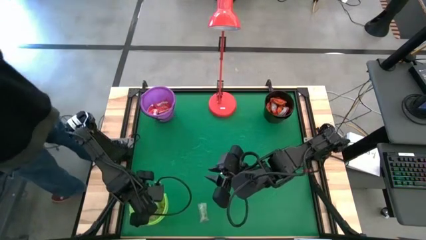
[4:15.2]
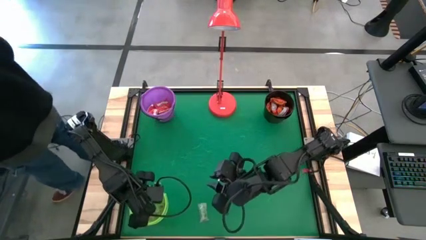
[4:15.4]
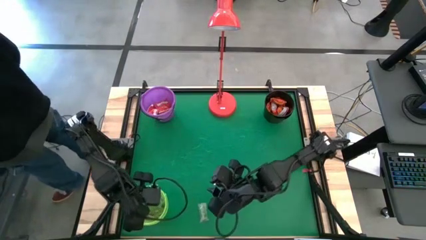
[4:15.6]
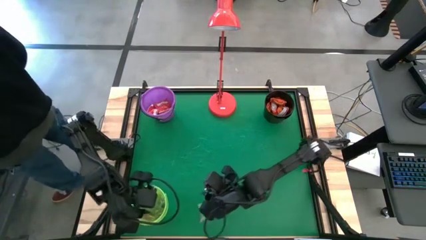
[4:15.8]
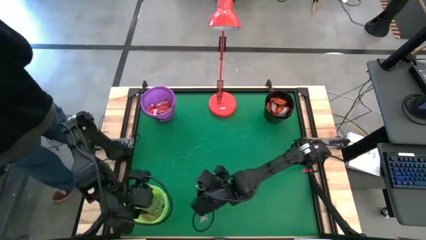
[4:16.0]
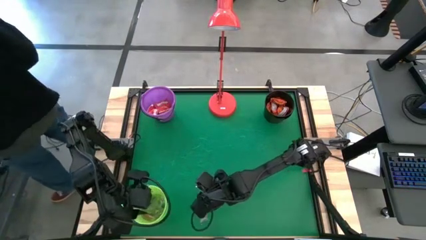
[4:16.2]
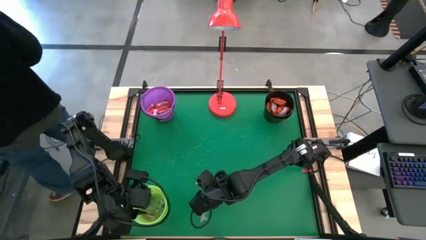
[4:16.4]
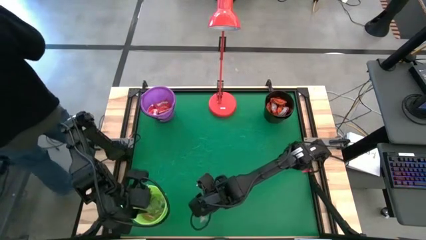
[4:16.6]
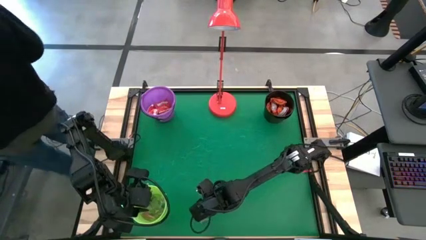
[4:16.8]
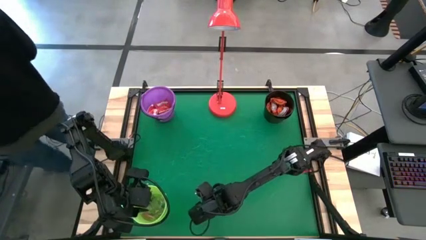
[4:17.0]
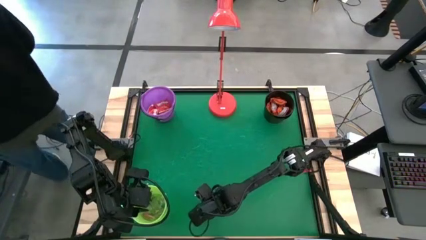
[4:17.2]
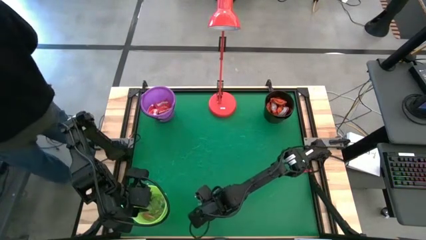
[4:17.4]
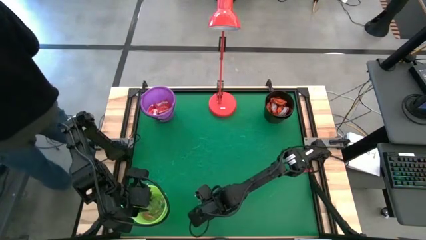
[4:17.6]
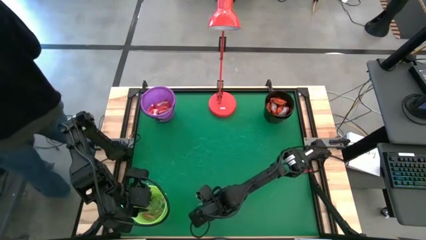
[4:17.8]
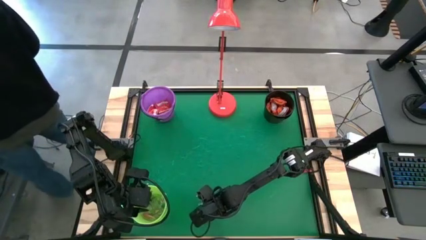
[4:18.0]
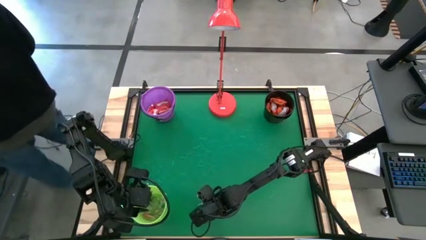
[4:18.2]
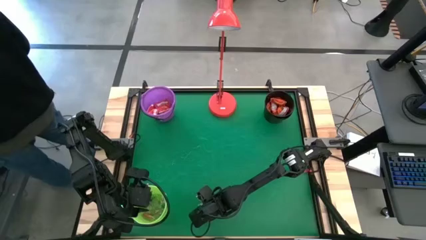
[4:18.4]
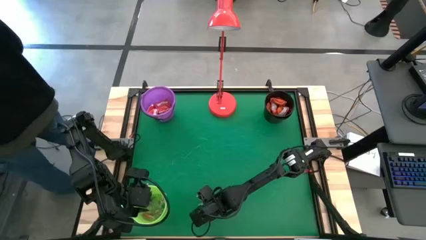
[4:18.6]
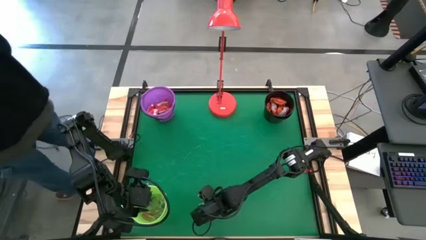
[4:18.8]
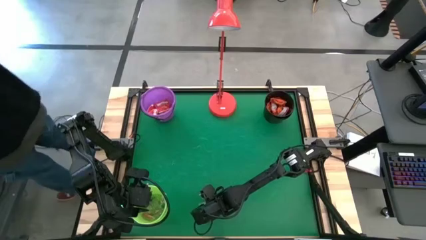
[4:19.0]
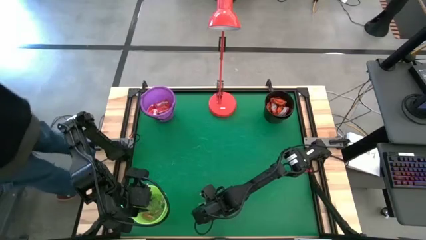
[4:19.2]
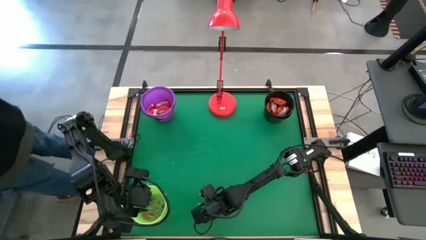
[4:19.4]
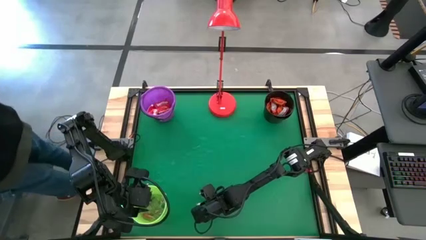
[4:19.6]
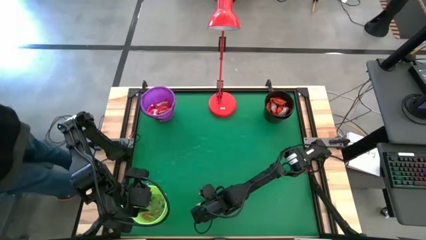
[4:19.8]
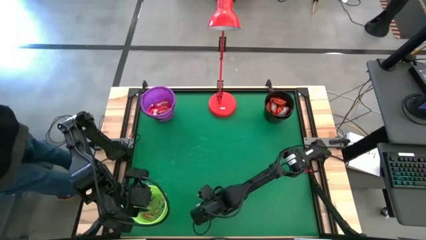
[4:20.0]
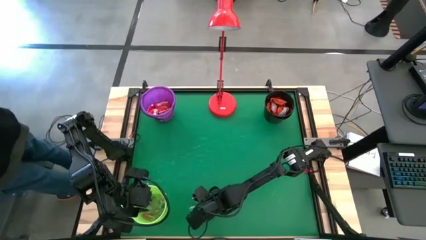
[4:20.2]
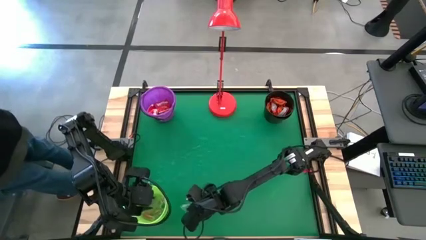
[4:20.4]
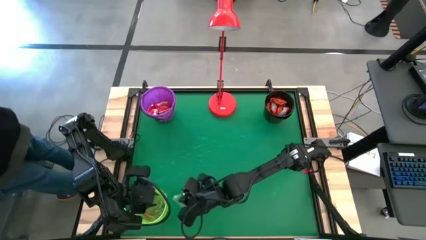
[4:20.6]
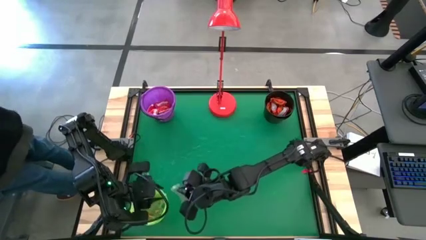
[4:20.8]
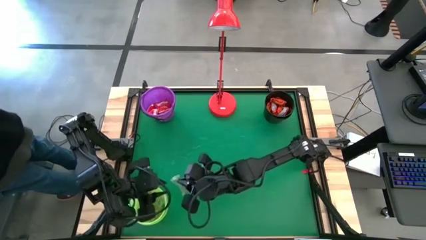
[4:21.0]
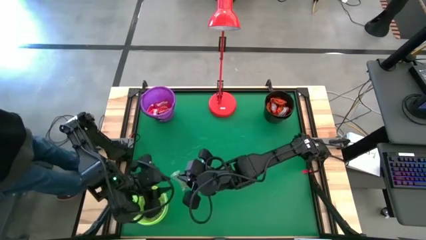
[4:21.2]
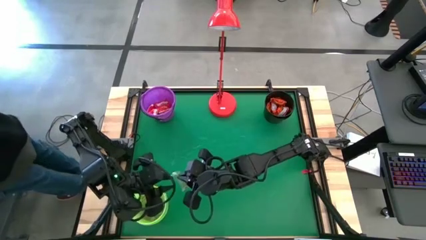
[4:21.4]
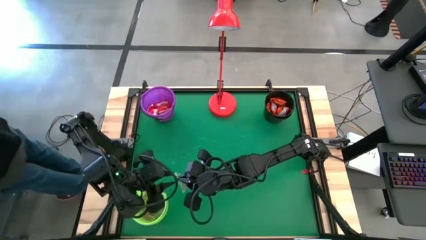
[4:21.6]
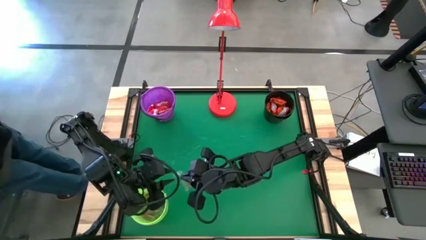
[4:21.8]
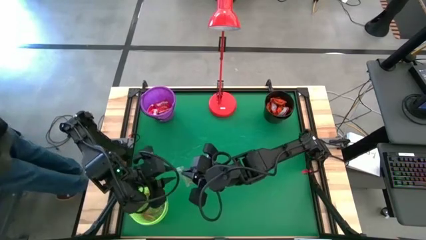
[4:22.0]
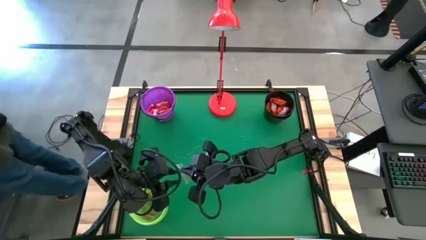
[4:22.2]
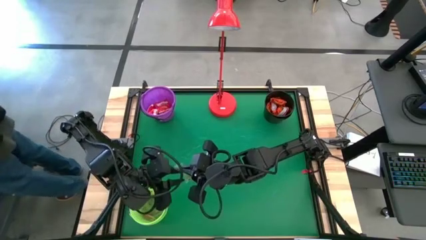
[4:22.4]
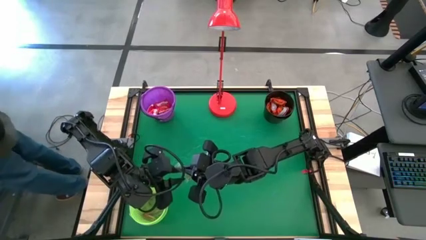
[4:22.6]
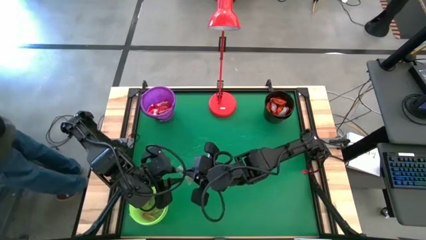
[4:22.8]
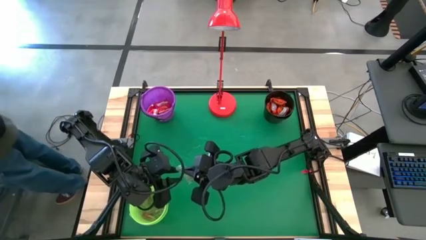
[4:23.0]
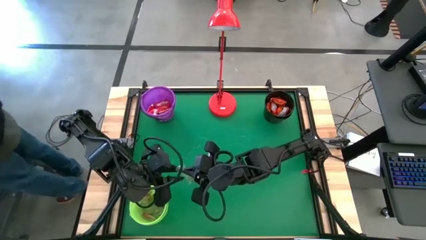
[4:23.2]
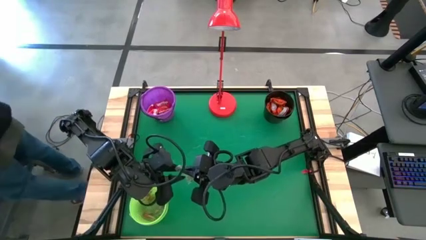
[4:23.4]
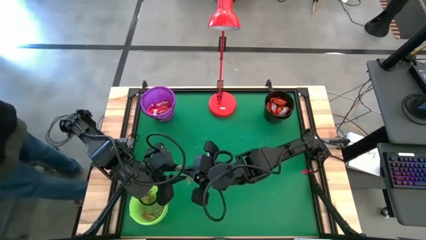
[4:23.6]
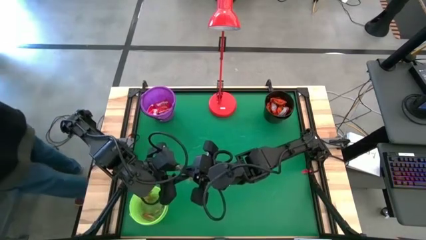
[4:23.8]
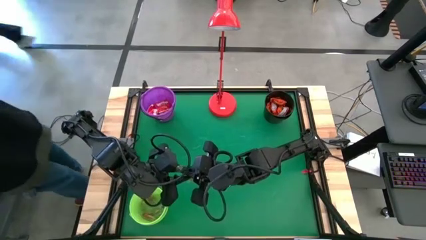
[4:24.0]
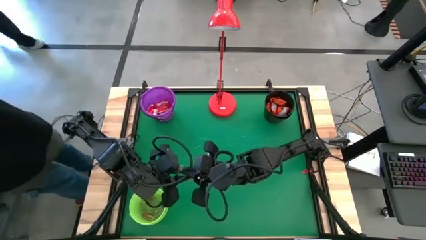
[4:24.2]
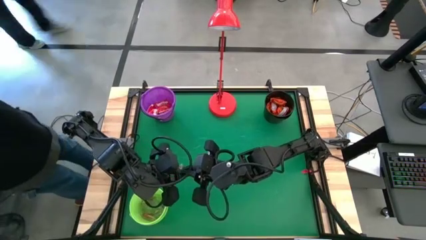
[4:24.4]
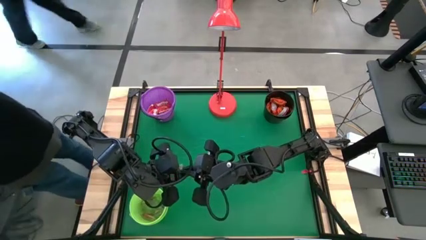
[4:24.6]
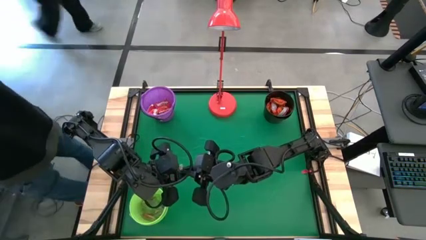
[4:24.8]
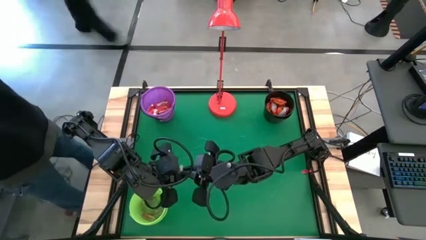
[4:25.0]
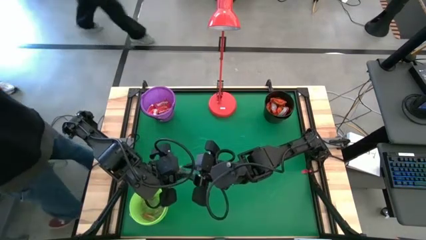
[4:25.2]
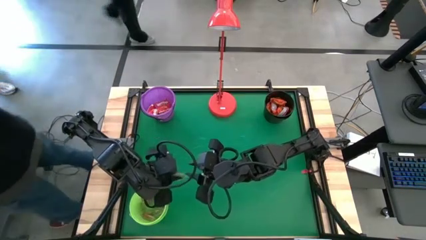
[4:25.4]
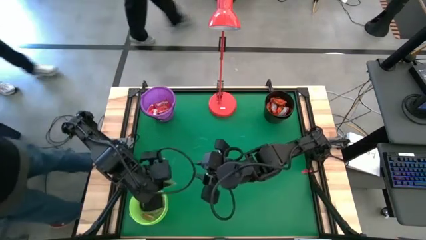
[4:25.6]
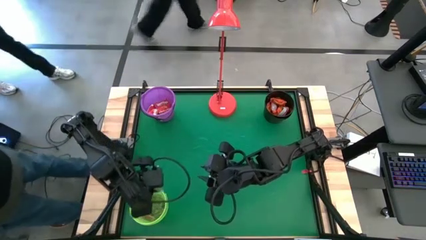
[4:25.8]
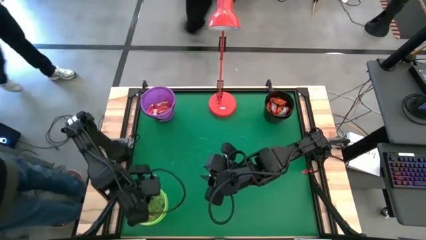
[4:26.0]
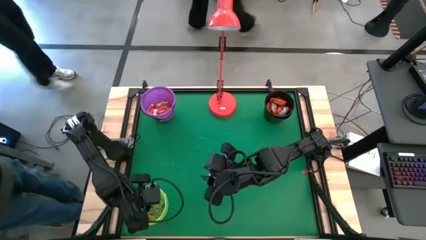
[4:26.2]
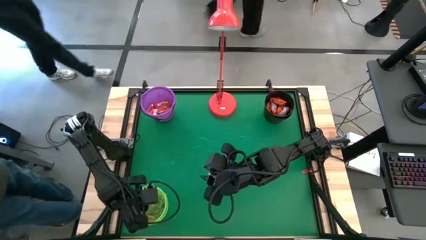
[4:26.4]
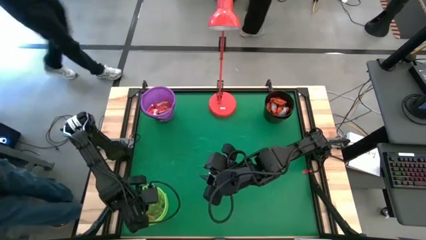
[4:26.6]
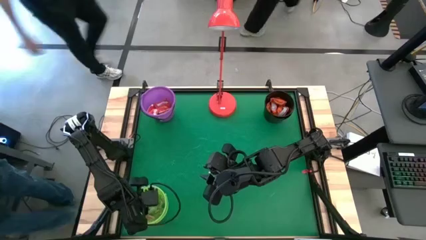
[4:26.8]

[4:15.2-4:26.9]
Task: Sort candy
Put the green gummy into the light green bucket

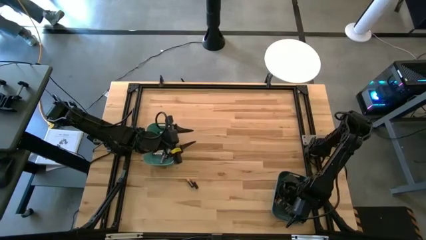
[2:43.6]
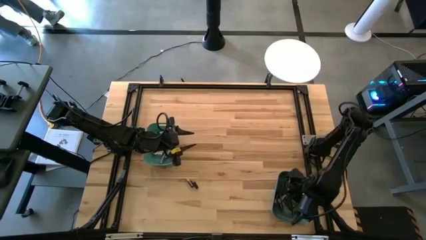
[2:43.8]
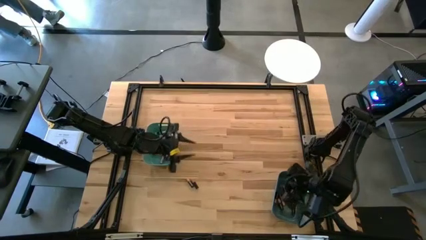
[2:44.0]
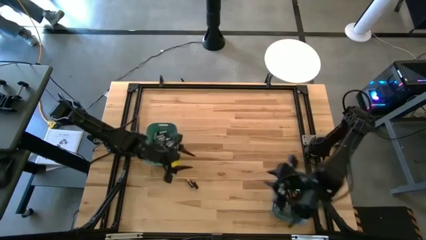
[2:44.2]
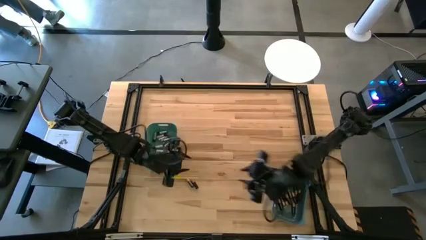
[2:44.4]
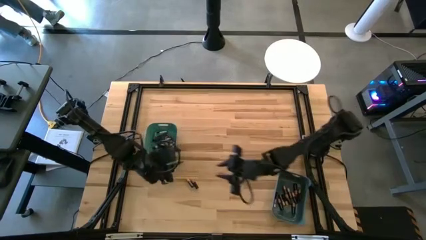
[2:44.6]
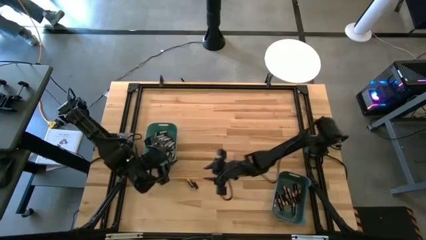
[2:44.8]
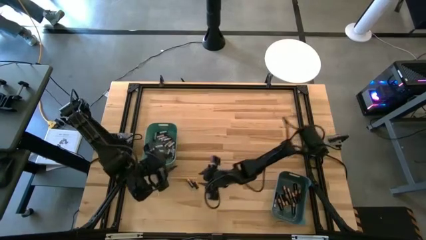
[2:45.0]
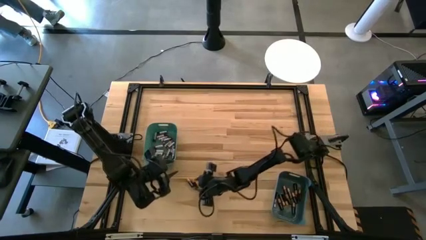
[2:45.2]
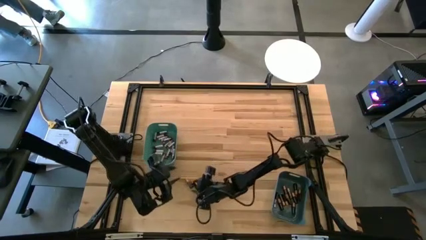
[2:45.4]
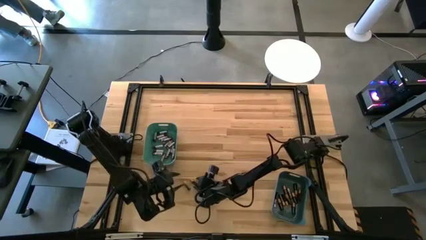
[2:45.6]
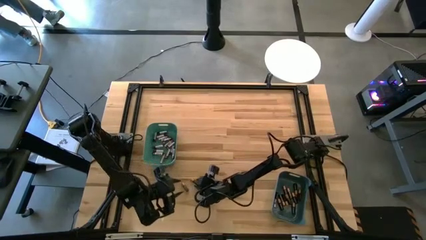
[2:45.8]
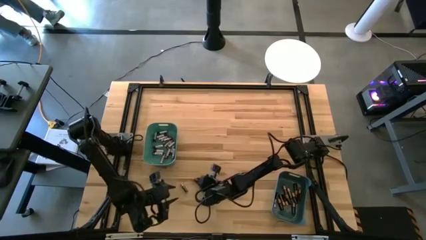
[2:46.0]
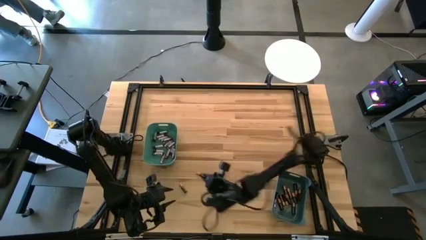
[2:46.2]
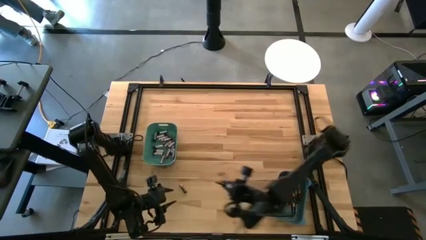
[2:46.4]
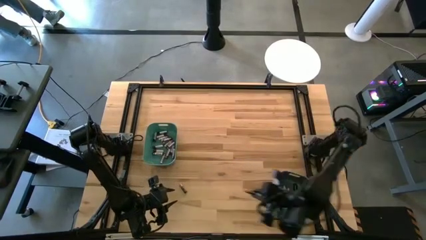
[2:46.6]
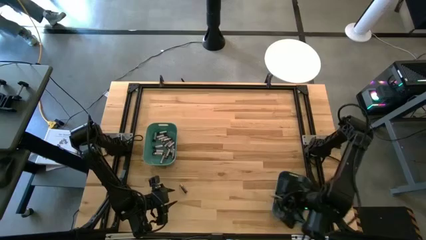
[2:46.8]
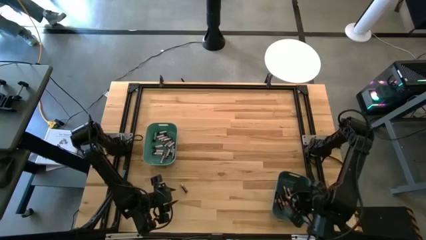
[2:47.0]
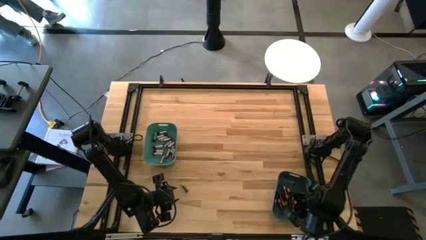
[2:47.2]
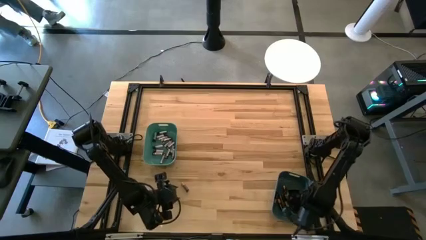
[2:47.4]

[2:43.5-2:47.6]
Task: Sort batteries
Put the black battery into the blue bin
